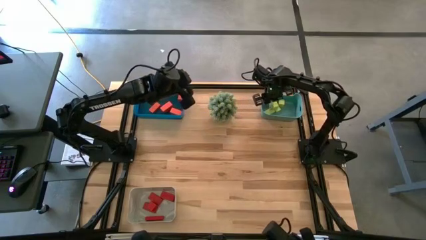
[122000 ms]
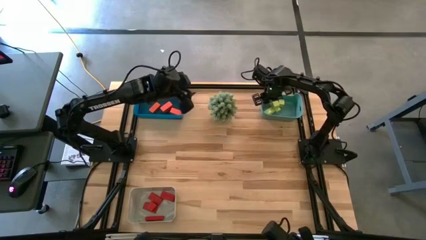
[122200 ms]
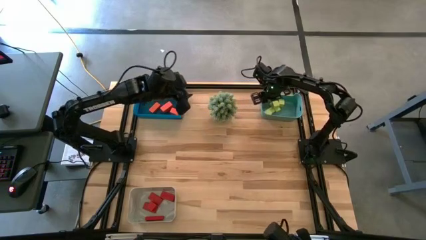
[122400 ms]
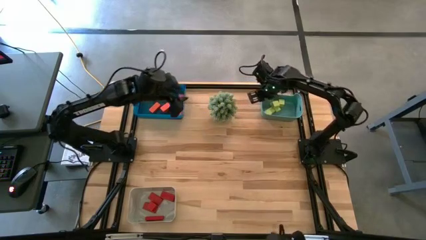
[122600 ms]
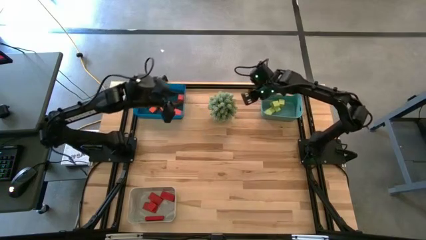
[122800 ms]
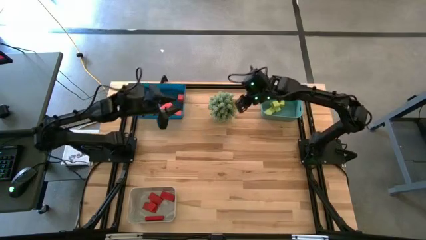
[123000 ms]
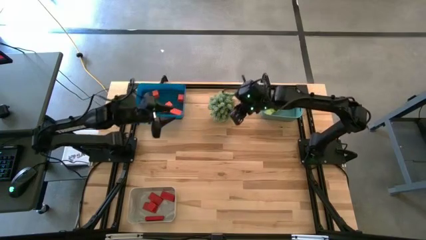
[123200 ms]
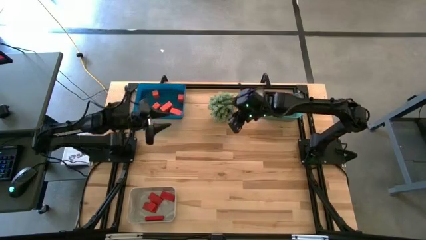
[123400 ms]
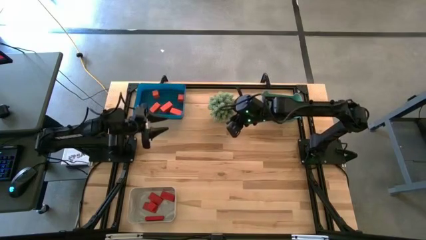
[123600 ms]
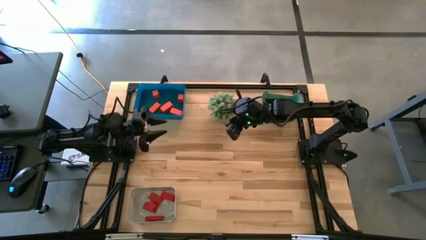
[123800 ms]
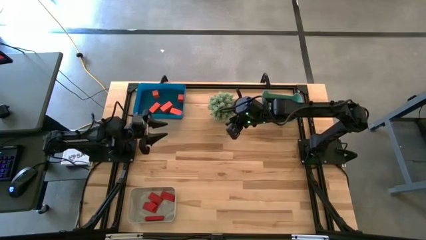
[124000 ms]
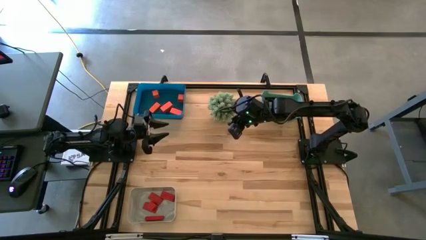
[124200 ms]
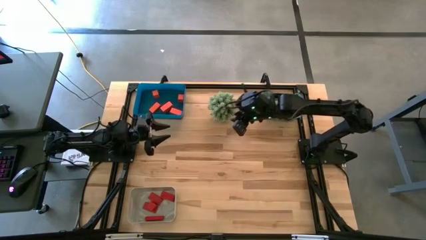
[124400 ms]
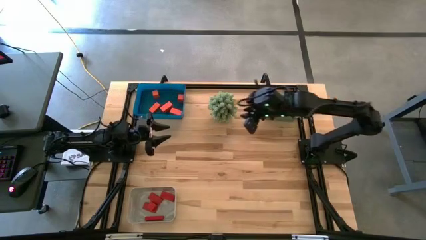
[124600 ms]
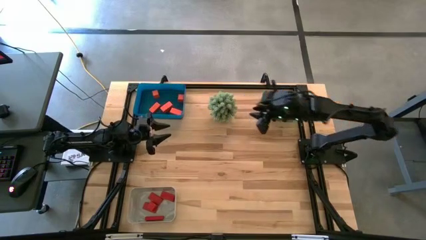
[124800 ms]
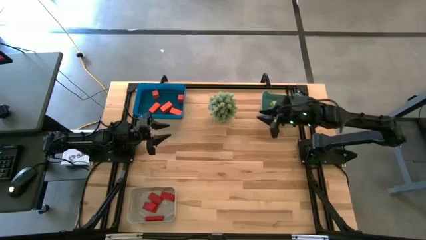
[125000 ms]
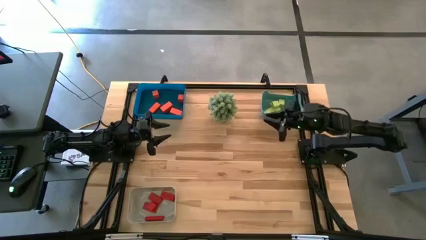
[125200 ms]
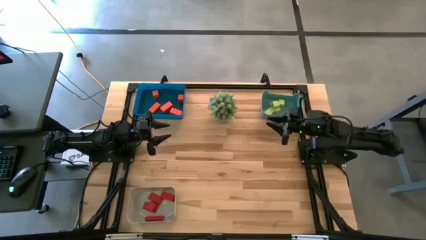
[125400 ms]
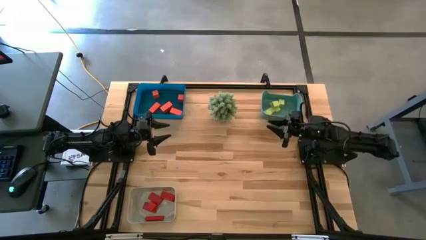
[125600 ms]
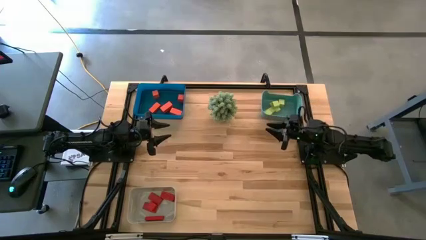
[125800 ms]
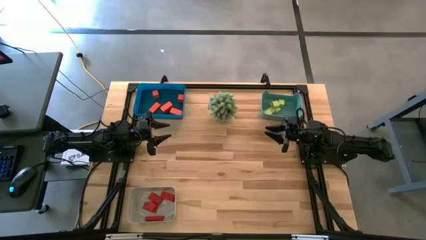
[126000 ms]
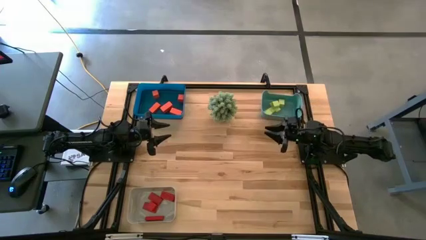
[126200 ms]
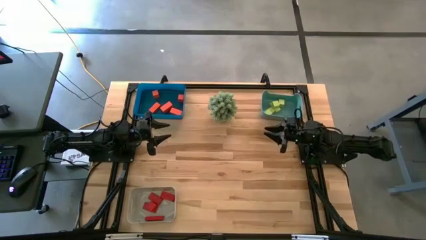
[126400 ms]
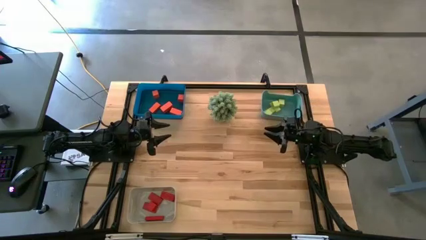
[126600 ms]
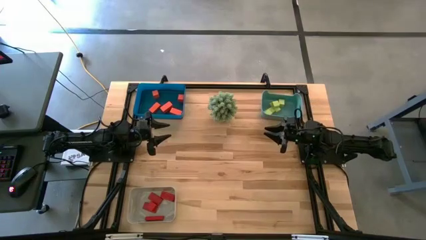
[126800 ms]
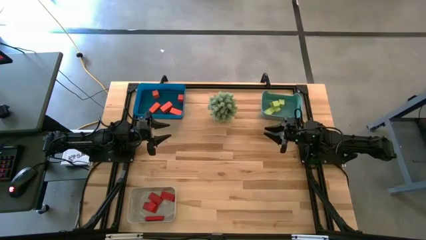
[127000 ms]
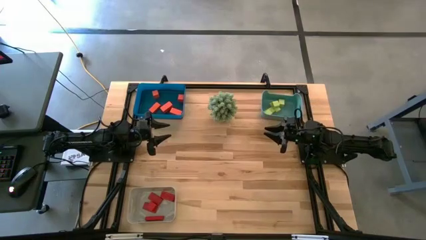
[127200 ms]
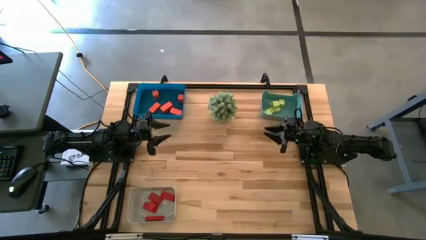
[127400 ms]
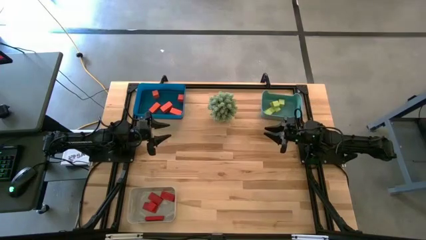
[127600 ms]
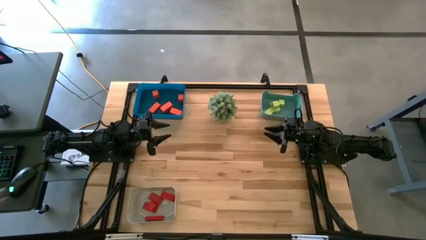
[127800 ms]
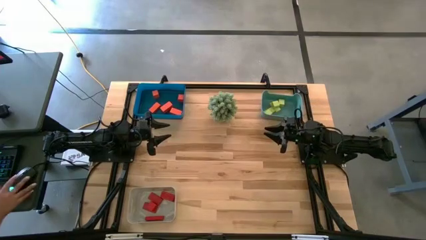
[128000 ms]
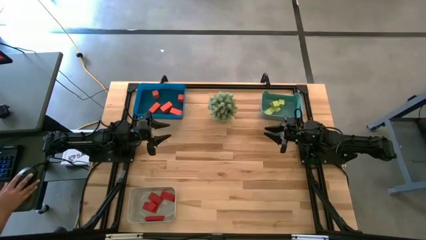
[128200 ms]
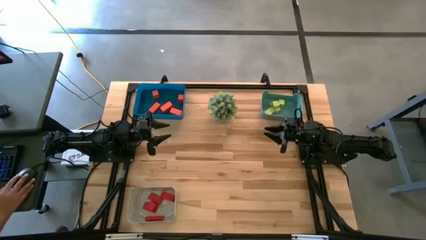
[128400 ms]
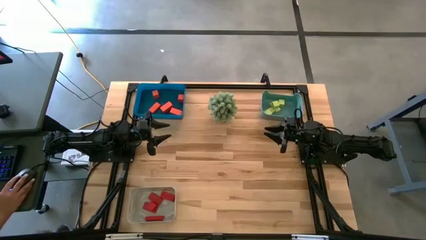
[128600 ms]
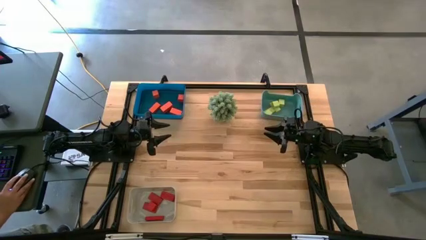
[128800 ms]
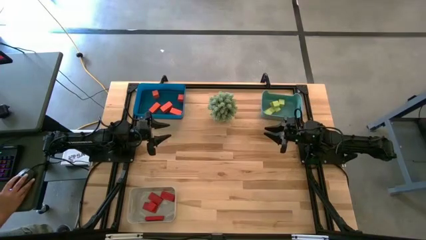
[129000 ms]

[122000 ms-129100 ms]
Task: Sort & place blocks by color
Return to Home Position

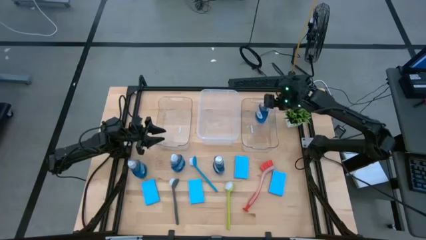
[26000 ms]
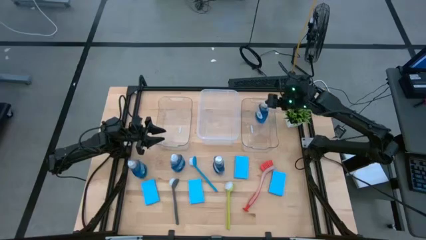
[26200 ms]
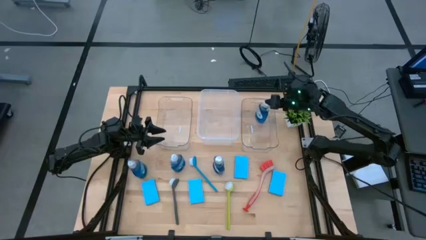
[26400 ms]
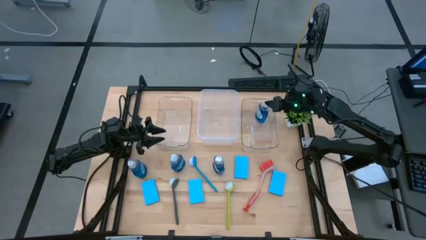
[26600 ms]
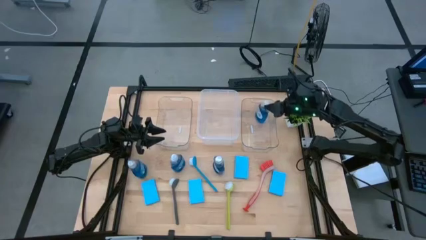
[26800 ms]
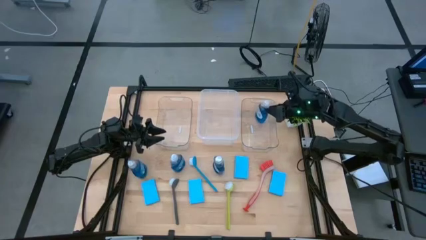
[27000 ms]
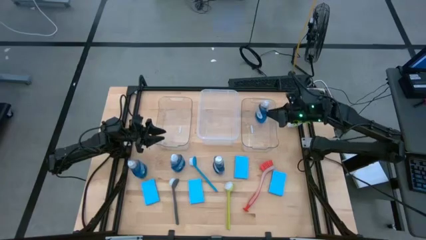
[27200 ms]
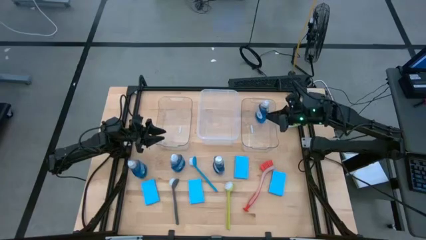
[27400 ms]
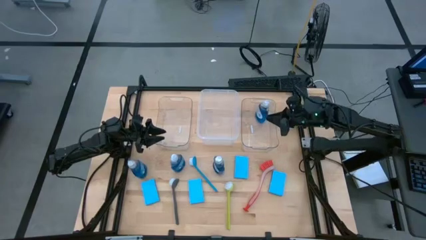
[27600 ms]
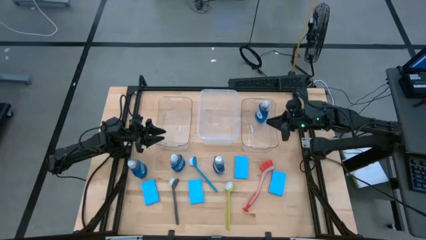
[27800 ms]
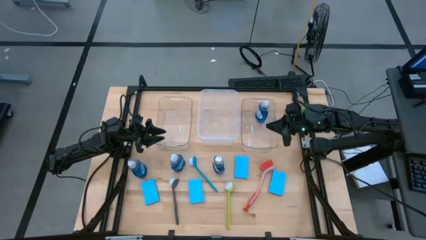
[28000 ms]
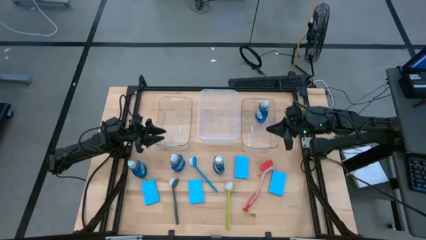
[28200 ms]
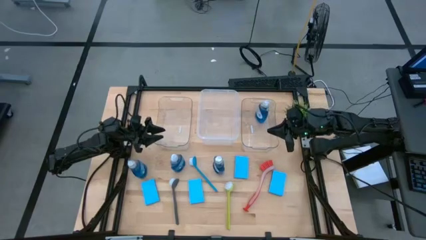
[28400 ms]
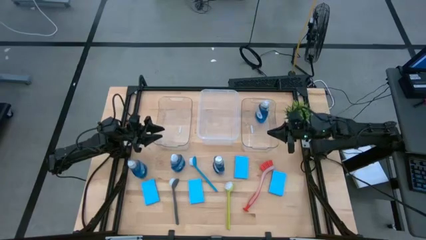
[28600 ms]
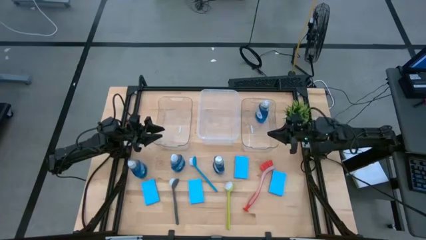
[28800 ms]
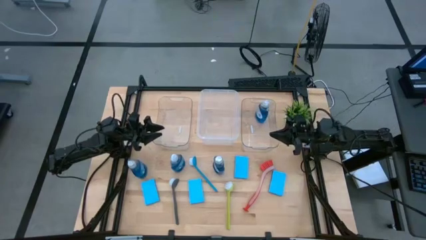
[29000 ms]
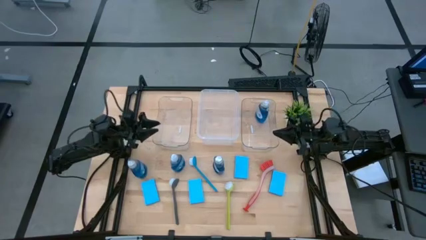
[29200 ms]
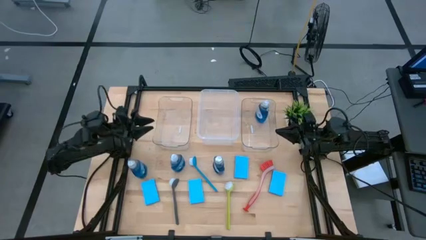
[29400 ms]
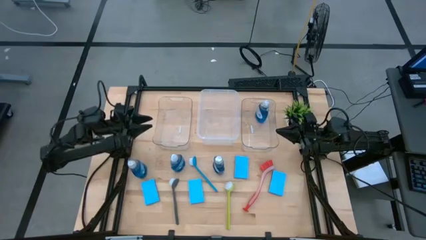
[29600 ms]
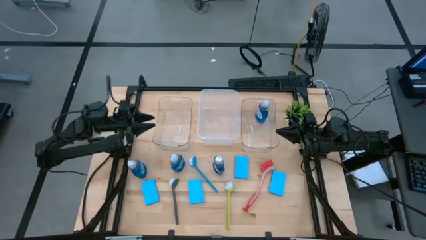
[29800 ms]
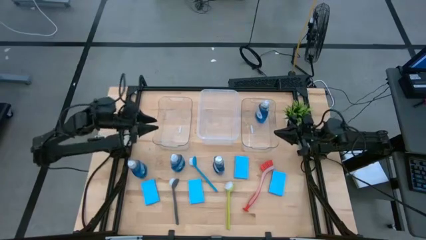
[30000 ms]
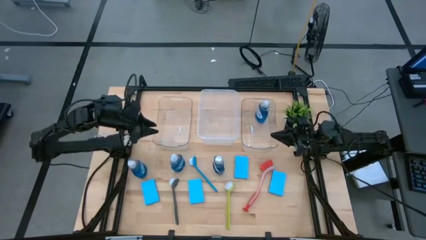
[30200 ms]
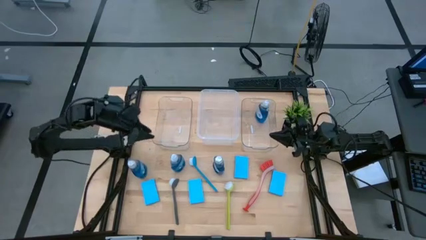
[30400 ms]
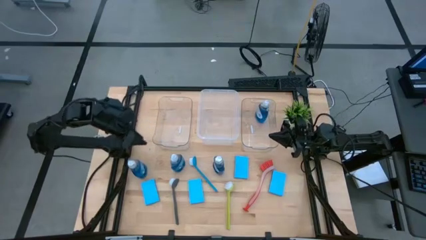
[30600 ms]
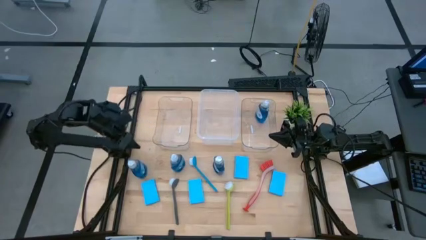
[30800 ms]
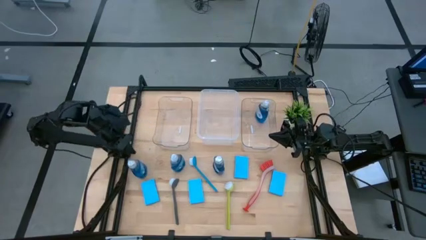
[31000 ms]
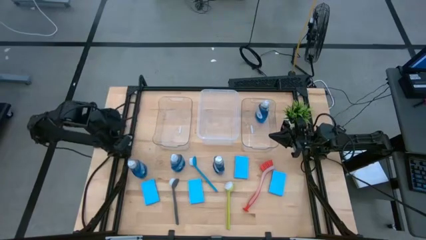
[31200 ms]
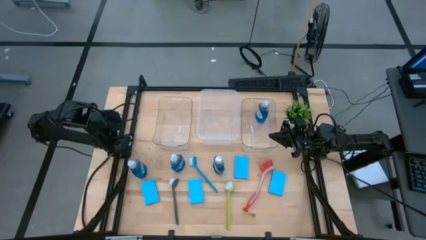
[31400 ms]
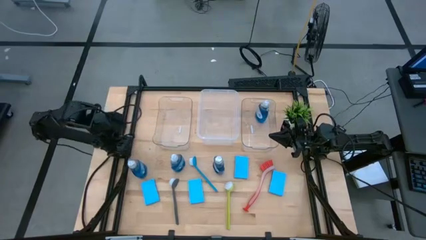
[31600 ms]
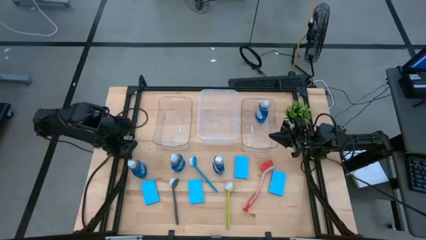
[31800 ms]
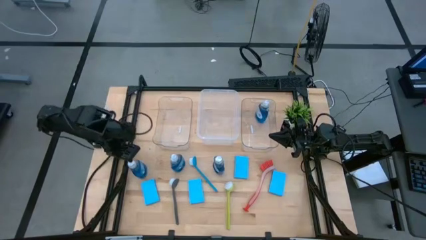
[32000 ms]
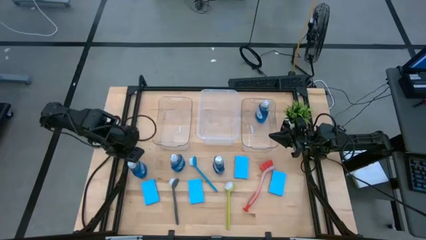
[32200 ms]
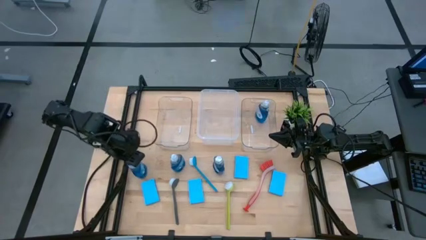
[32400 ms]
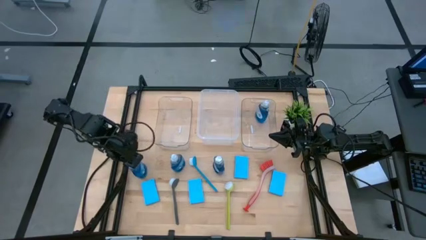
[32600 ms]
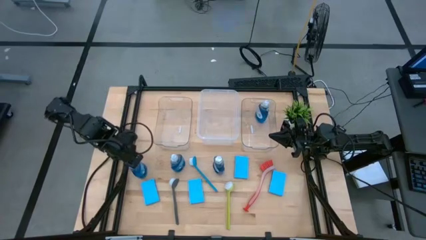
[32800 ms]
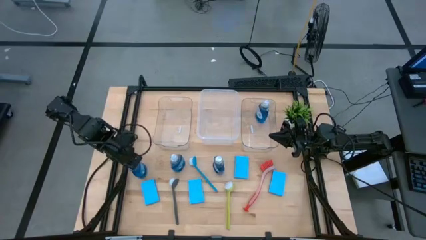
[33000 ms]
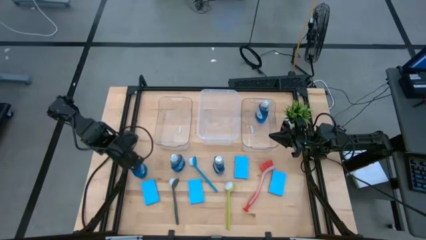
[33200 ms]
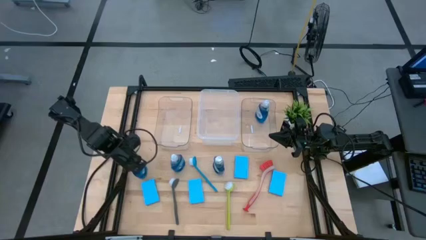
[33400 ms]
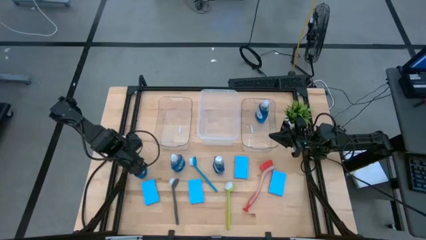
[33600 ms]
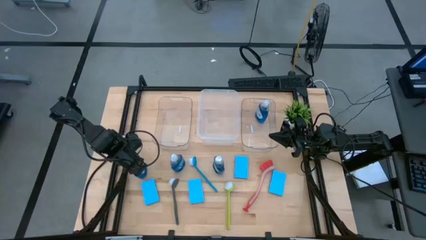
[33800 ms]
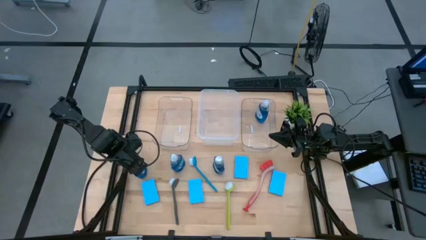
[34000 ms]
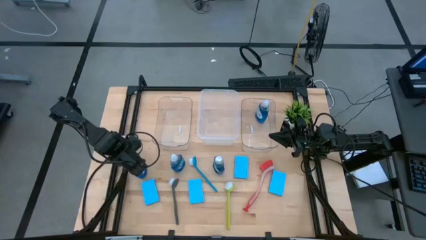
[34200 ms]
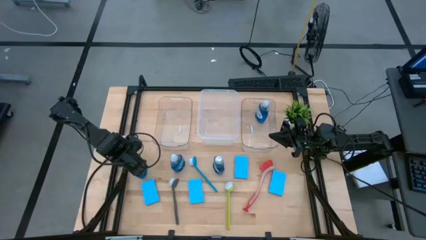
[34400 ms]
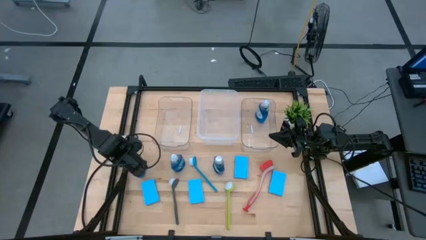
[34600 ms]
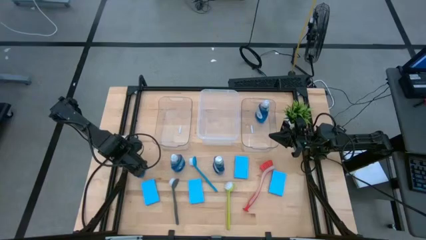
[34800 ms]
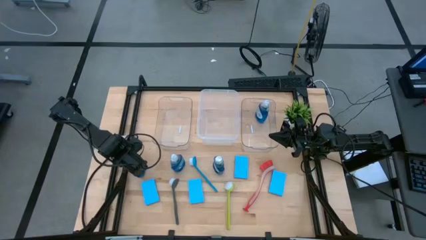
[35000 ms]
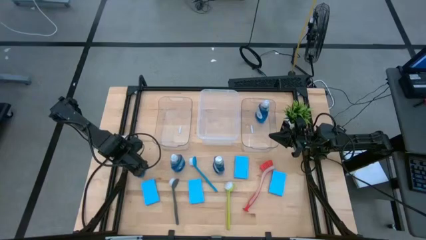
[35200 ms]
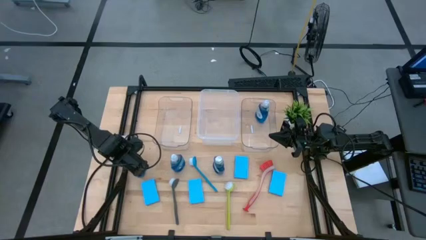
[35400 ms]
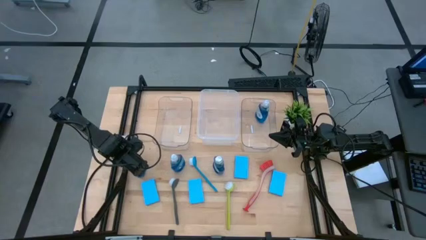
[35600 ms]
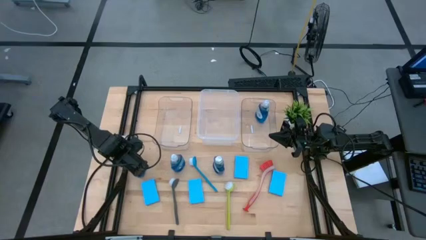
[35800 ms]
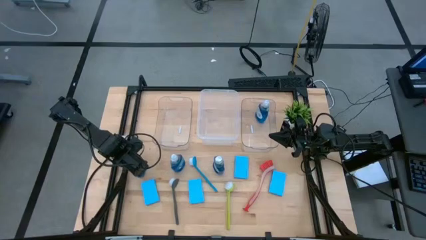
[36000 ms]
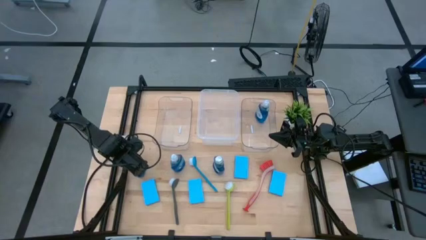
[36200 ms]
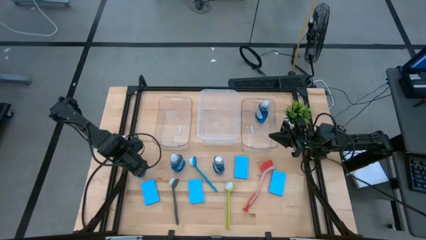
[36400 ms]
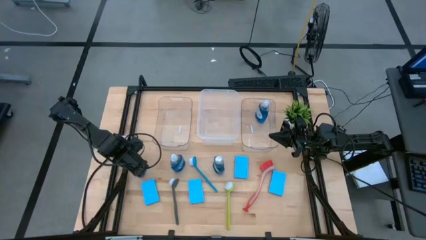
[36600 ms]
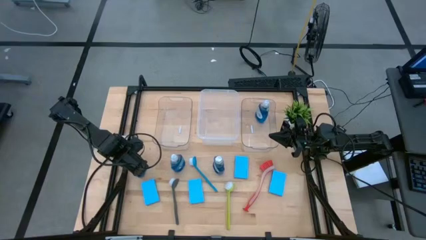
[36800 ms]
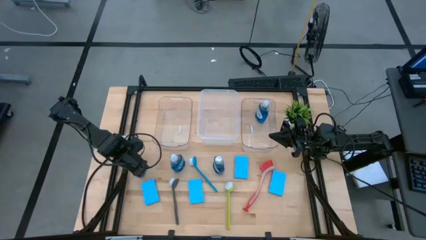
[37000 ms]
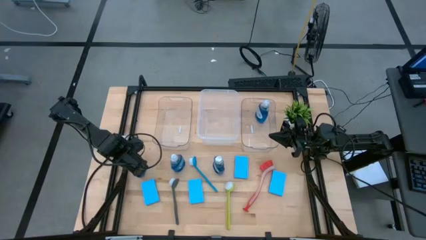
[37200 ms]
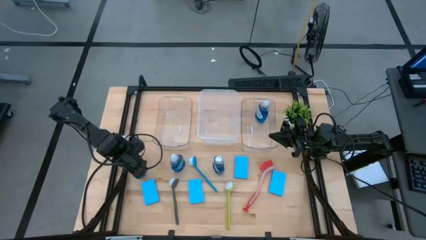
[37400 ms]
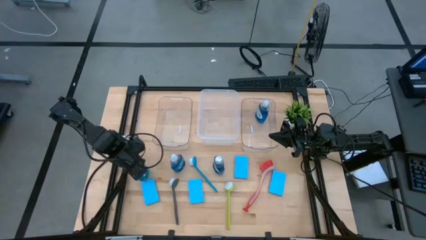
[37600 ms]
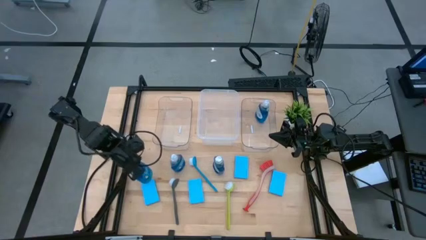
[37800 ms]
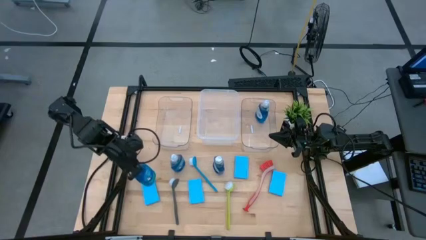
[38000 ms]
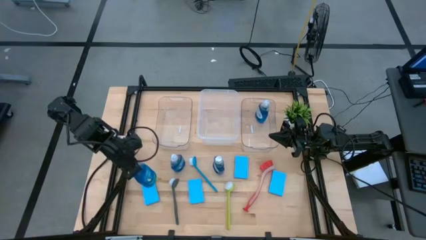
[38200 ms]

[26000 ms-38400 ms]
Task: Pick & Place Kitchen Sink Supplies
Put the blue dishwashing liquid into the right transparent bin
